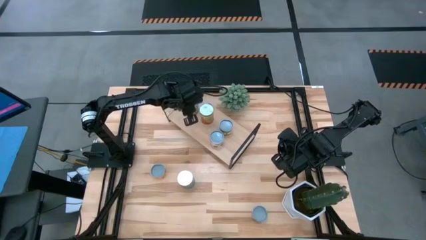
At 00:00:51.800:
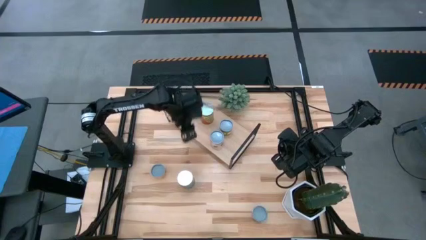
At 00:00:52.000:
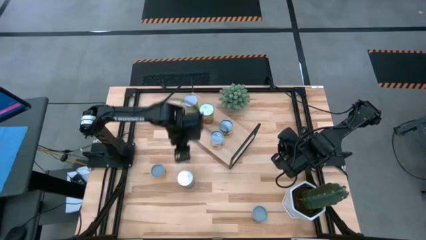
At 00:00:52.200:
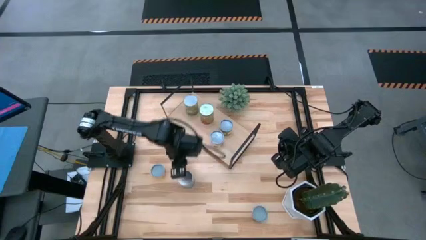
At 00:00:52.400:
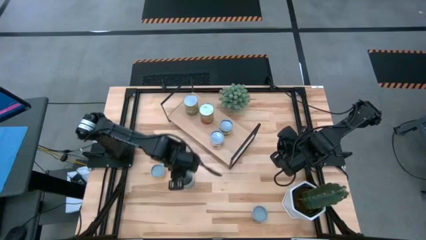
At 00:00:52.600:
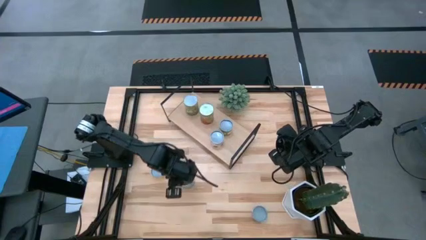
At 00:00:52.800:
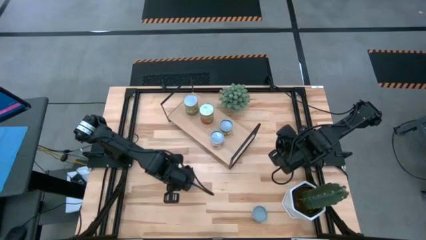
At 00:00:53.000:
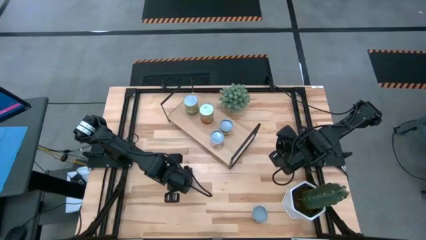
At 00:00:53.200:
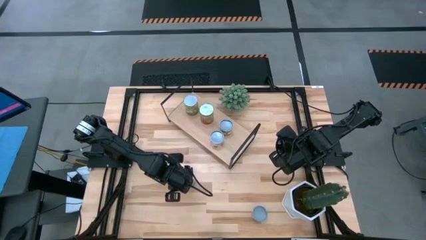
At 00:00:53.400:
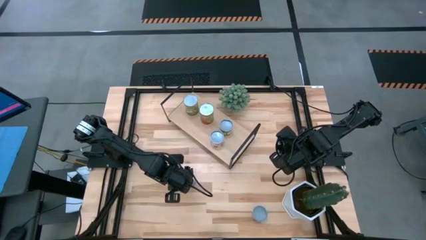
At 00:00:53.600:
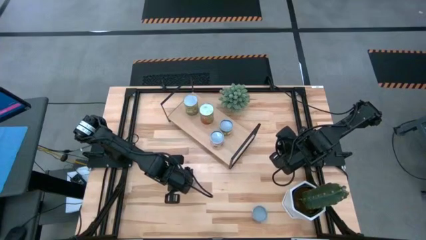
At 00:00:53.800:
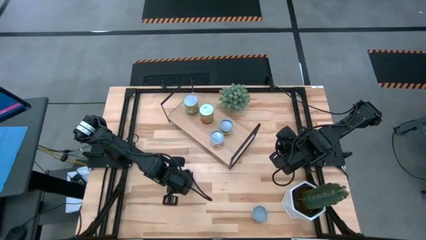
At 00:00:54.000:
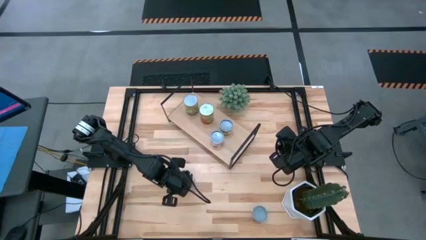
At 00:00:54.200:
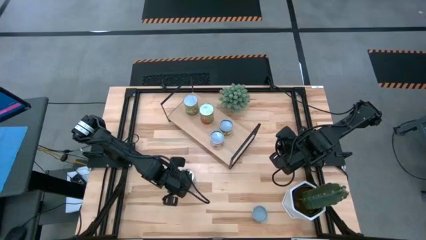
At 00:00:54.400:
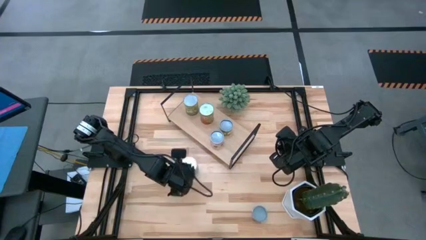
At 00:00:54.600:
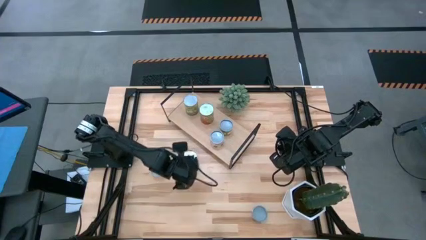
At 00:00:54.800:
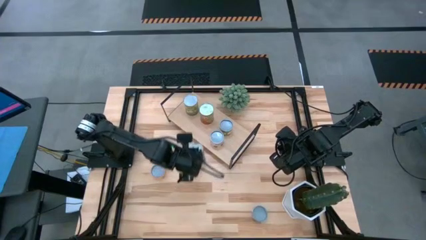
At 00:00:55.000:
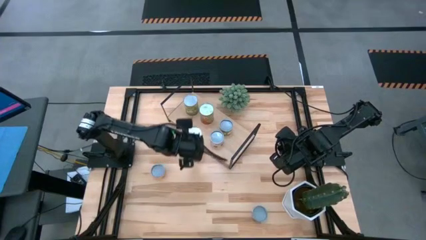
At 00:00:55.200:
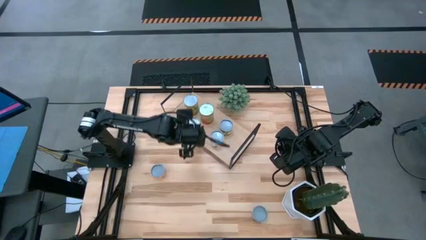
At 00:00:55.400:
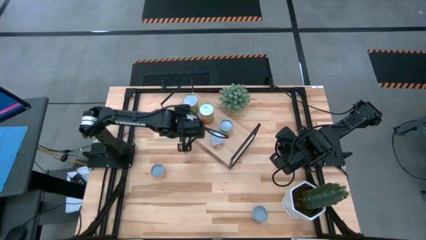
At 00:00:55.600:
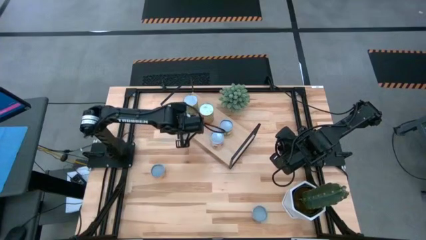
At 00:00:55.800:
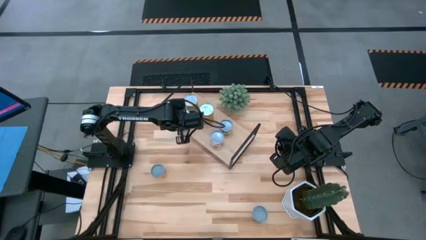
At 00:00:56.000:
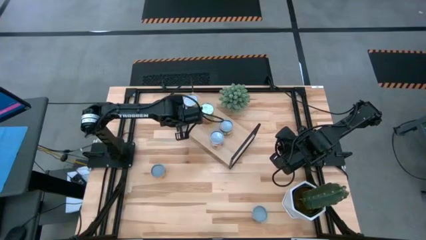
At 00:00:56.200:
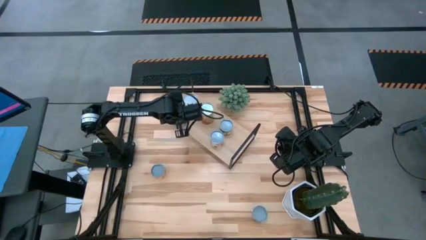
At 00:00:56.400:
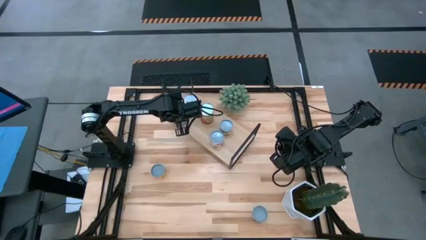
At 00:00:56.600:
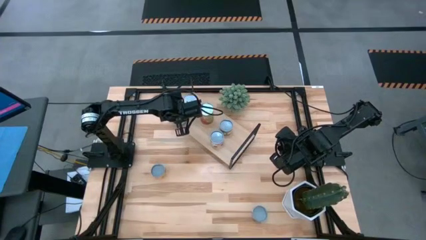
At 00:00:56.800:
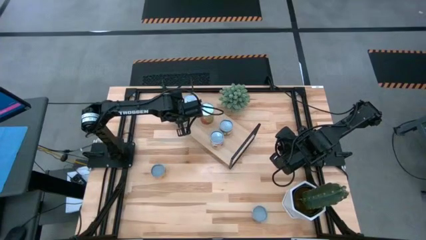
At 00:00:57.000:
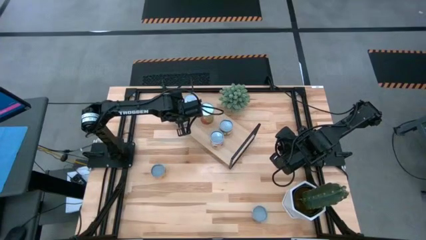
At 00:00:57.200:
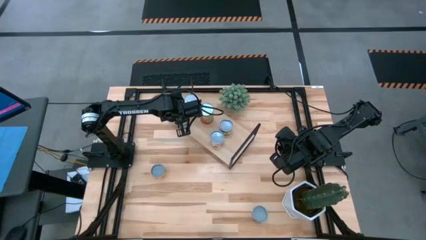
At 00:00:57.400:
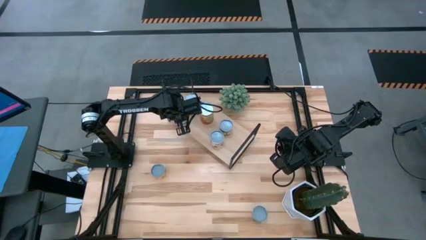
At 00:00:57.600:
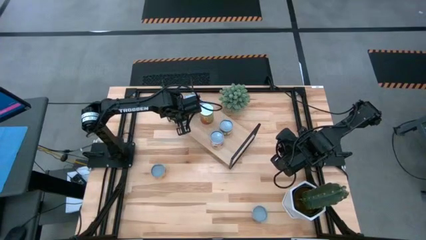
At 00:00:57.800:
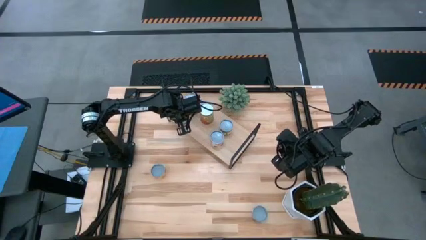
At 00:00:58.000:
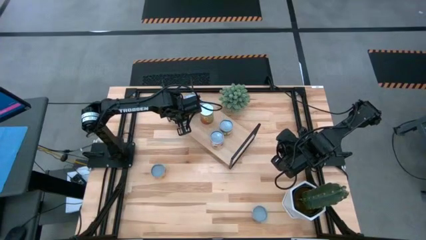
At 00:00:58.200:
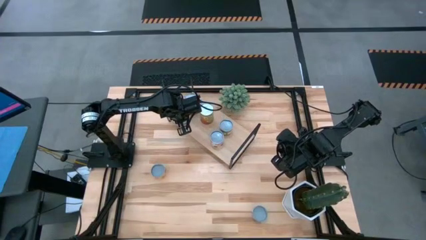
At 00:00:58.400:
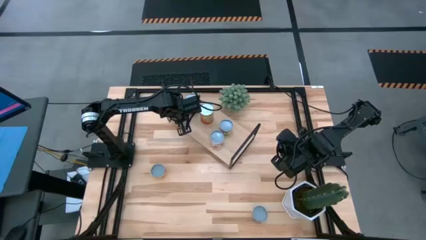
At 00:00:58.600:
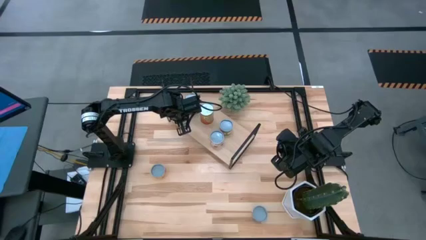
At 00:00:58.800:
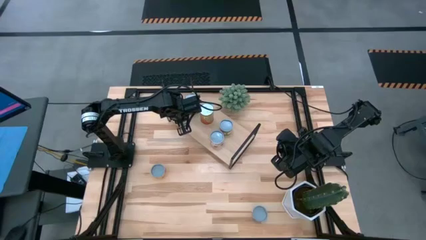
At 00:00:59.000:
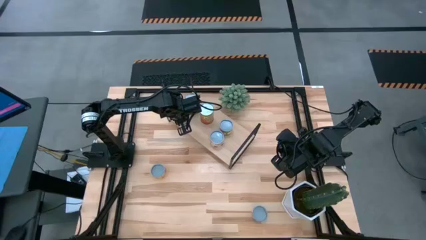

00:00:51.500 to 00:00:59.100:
Task: Pick and place cans onto a shelf
Put the canned tomatoes on the shelf

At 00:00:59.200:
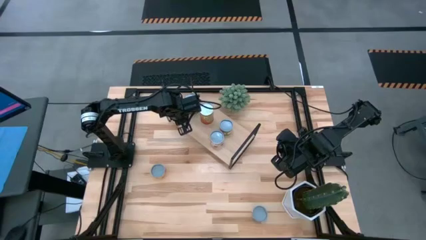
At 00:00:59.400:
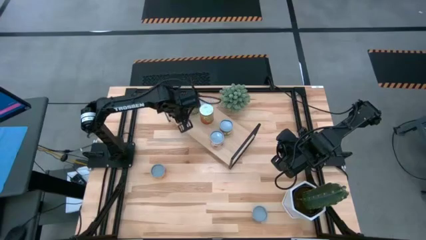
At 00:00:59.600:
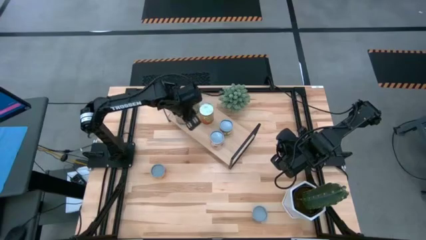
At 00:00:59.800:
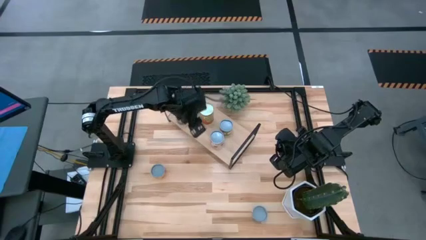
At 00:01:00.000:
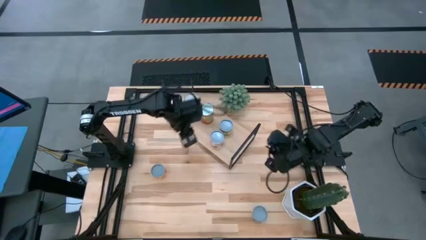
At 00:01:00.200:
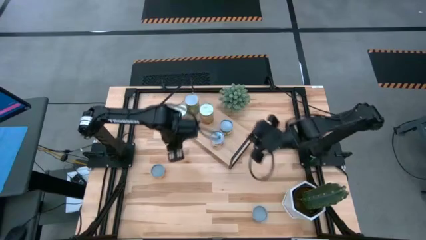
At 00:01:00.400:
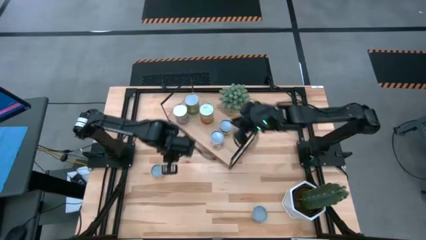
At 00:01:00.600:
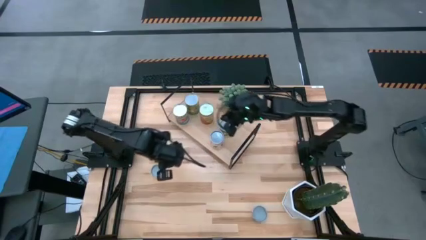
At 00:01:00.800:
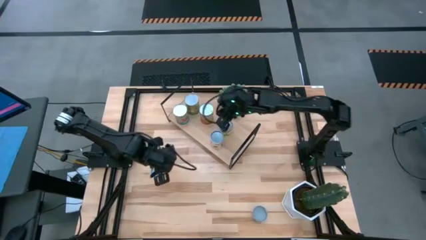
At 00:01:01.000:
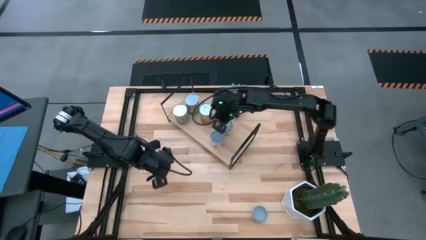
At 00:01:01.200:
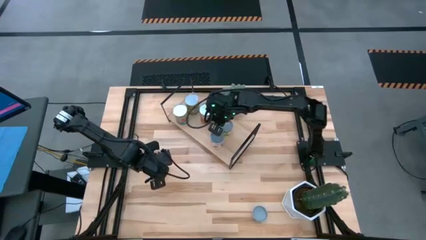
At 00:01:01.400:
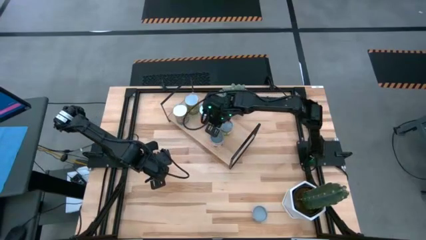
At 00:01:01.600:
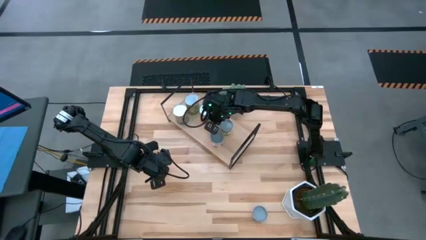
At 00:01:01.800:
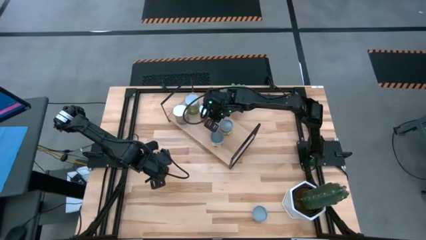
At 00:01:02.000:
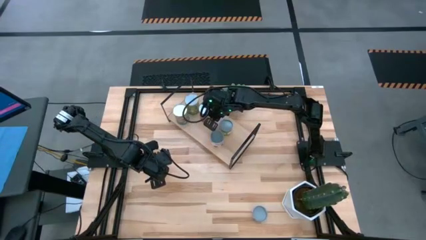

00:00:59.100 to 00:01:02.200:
Adjust the green beans on the shelf

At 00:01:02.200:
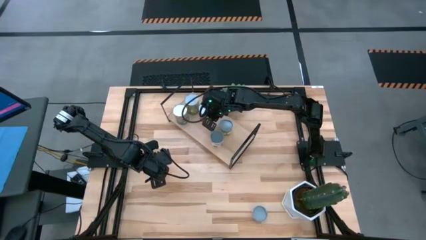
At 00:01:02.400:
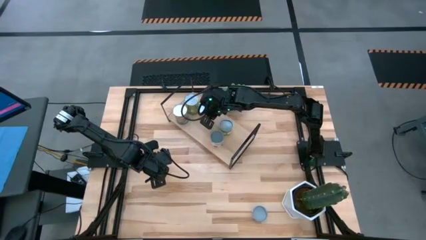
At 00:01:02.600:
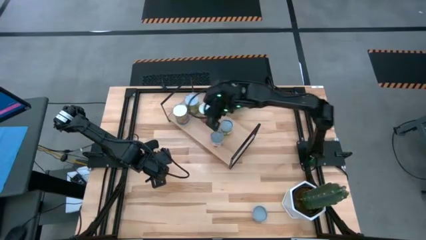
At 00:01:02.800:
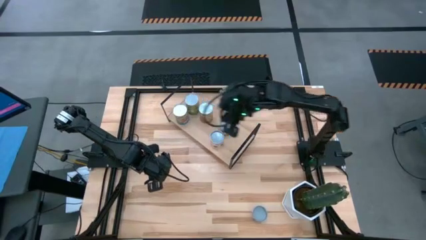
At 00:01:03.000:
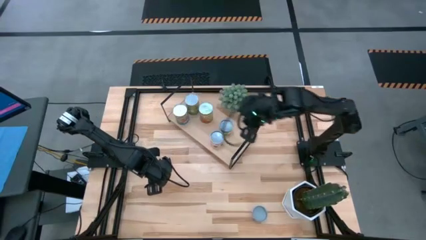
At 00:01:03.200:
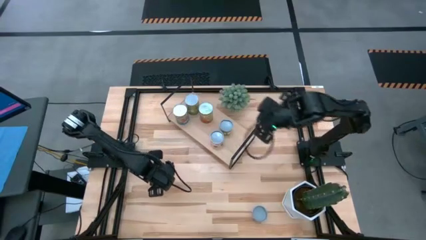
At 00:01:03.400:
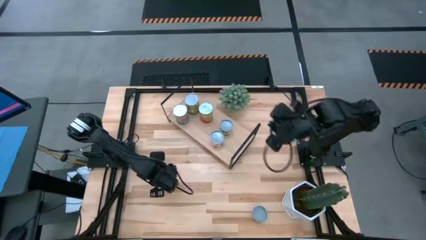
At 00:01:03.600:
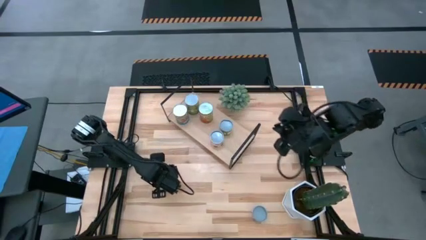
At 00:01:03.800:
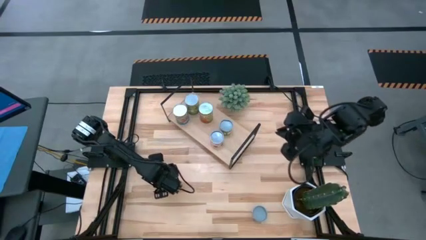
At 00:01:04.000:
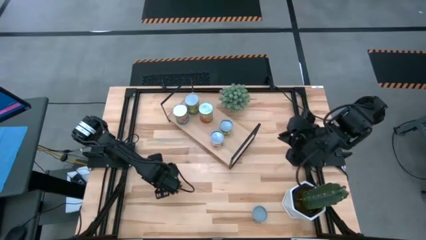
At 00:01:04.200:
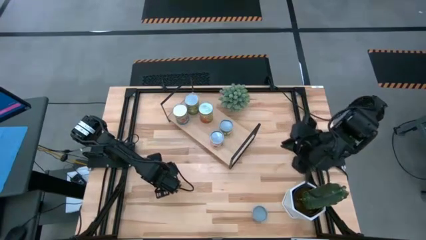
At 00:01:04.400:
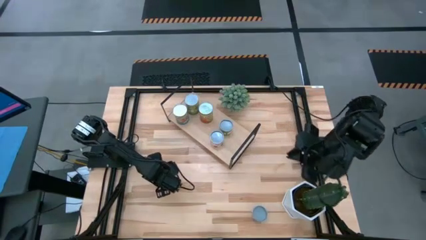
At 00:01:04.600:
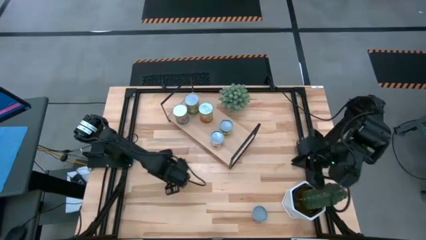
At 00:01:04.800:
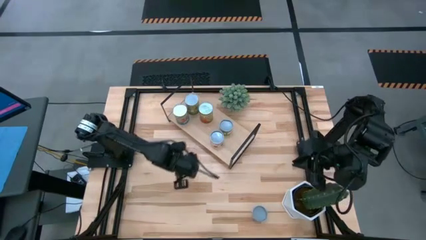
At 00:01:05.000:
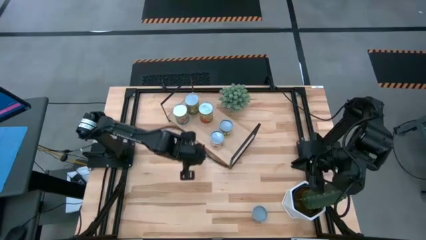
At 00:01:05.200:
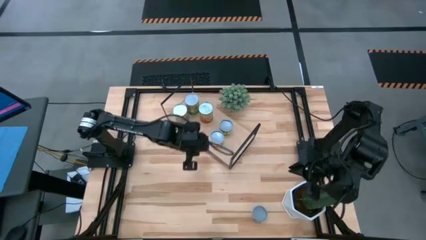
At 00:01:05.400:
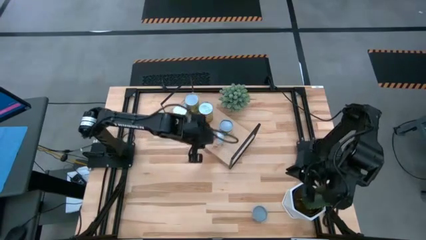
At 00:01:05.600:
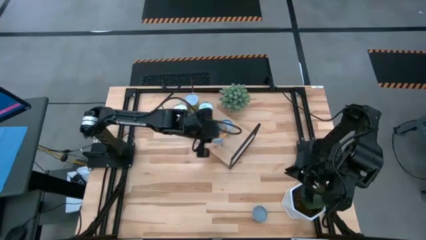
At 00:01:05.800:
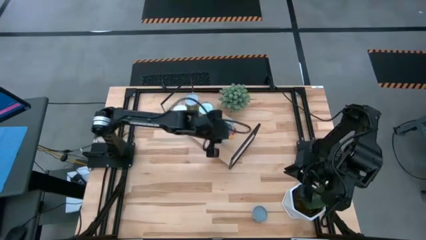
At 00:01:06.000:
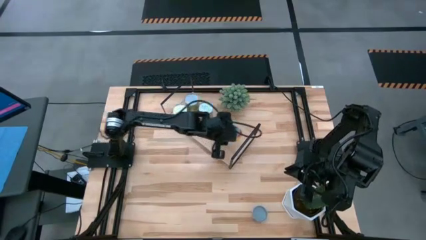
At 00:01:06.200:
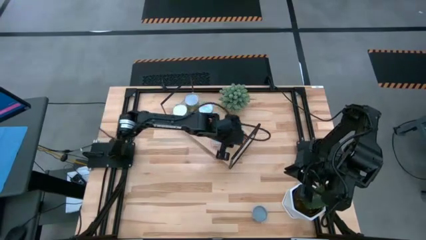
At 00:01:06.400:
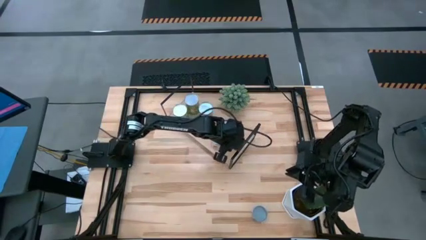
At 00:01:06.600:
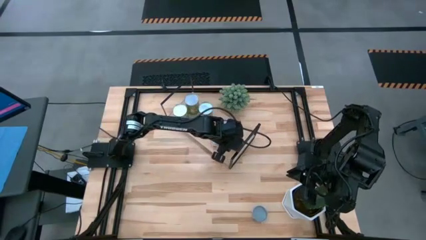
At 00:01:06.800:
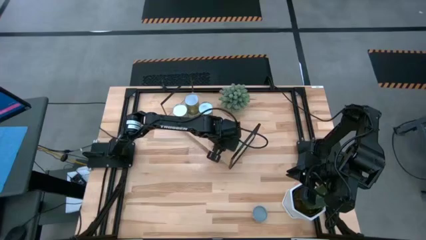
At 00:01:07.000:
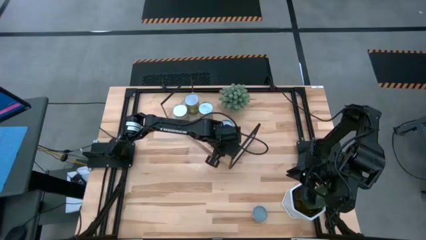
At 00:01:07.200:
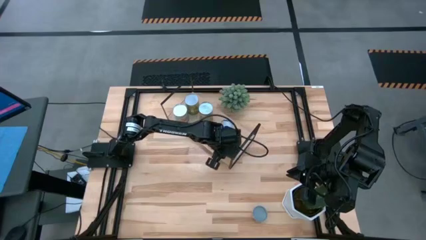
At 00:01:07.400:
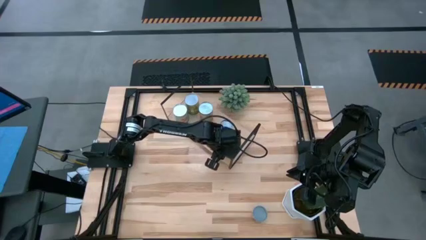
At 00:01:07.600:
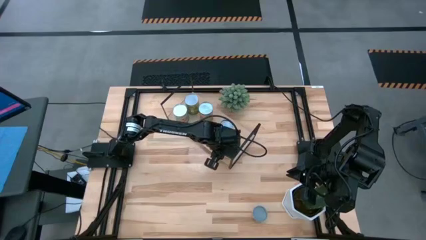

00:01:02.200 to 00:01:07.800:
Put the canned pineapples on the shelf
